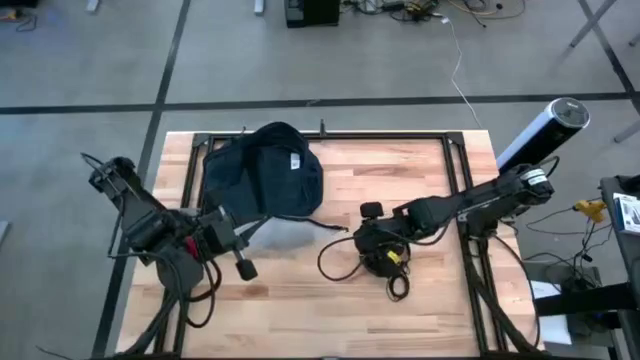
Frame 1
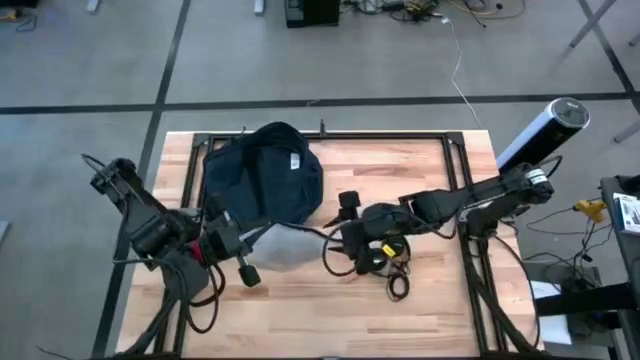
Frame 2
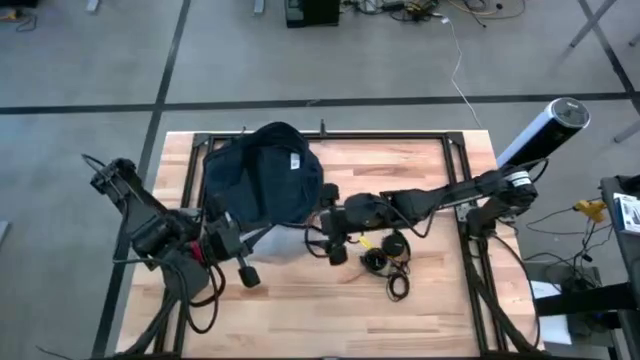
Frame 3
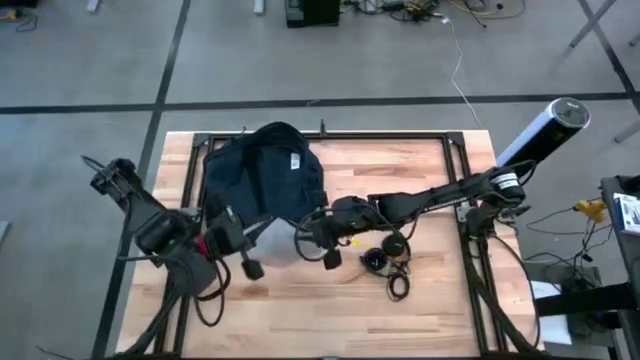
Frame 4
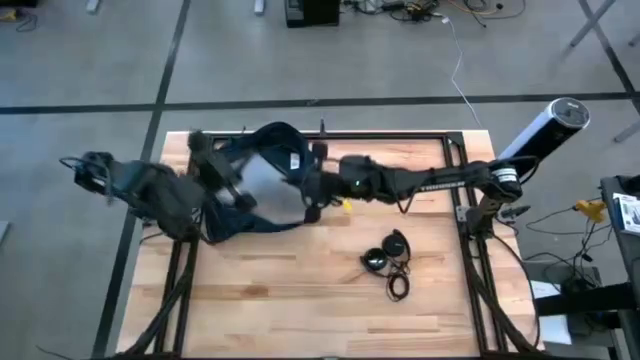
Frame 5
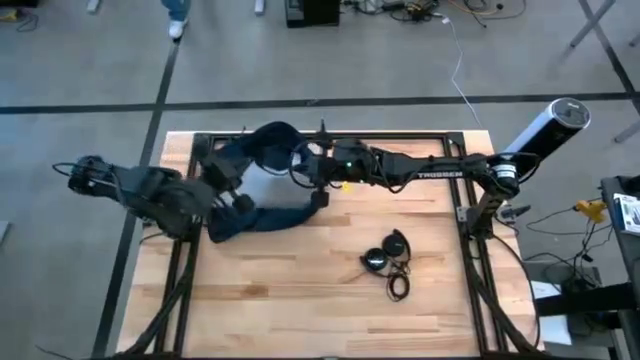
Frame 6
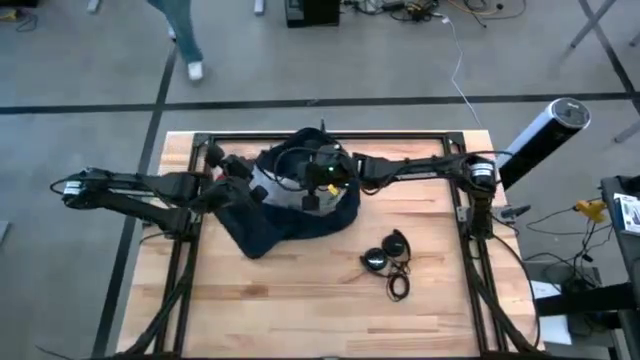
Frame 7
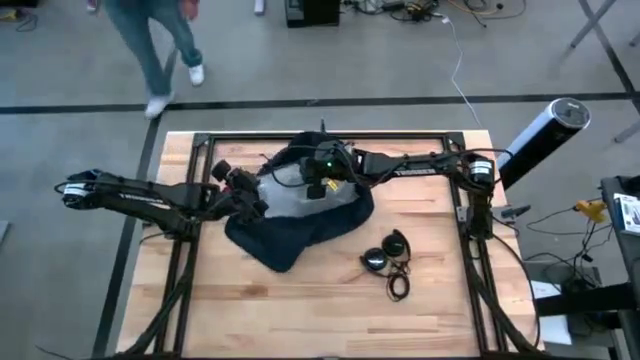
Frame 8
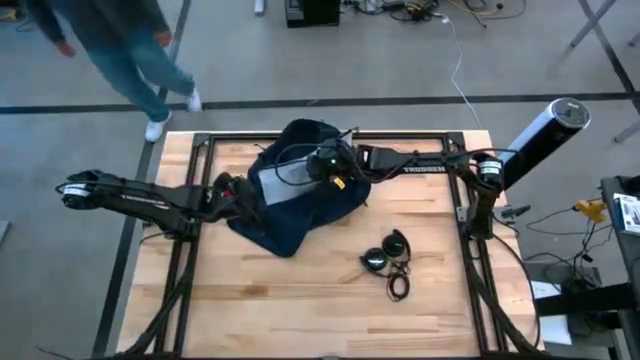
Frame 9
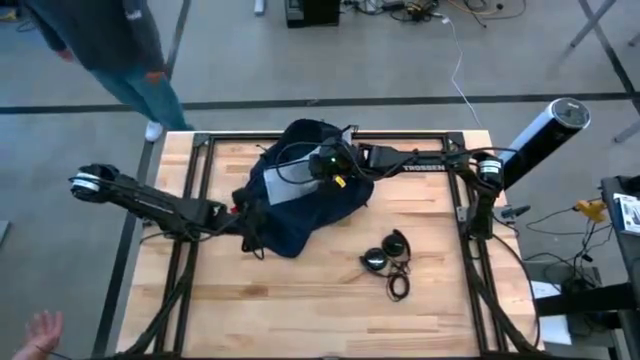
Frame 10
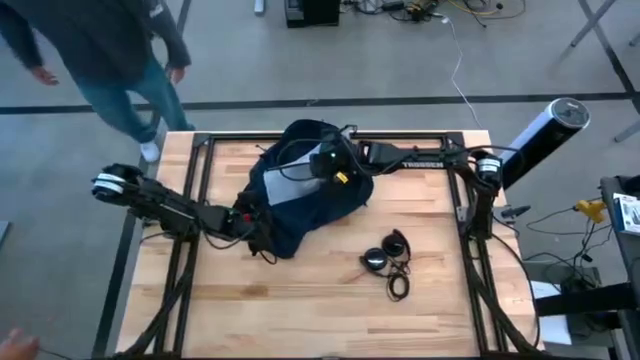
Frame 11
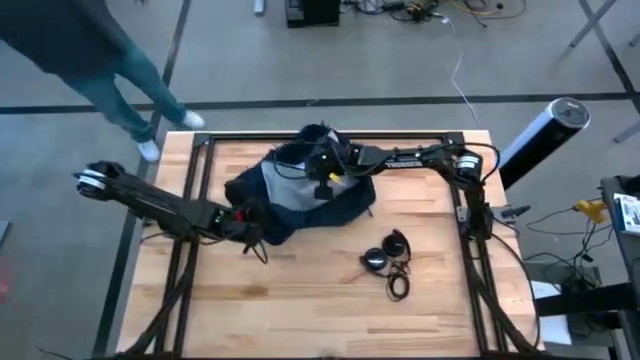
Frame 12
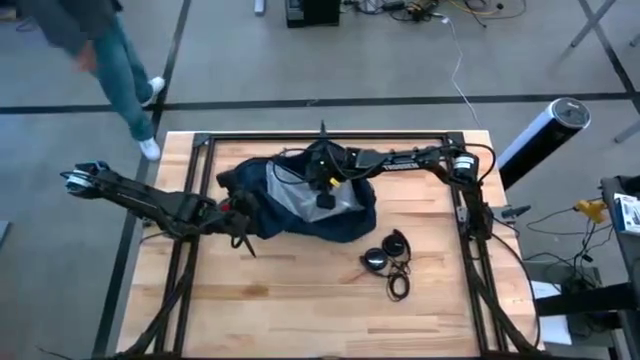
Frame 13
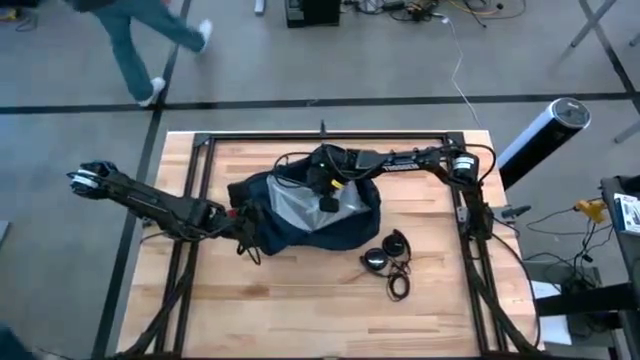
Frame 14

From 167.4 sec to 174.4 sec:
Task: Unpack backpack
Put the white zipper pouch into the blue backpack

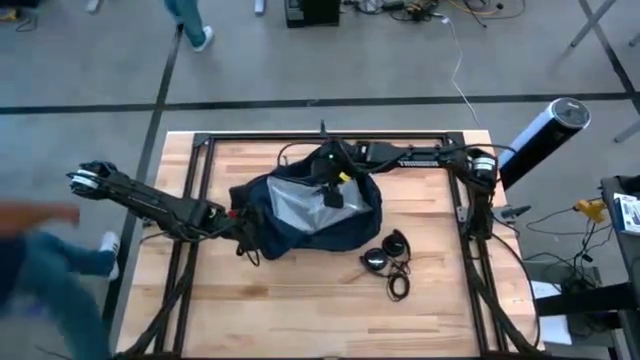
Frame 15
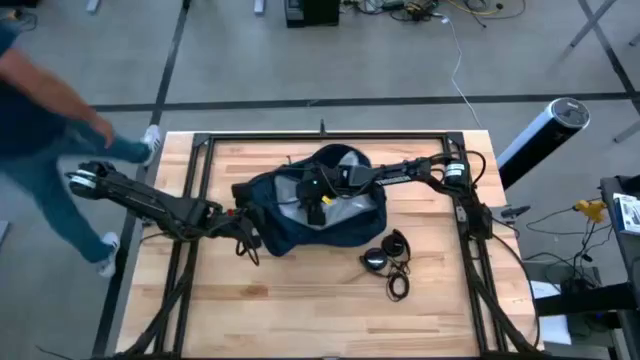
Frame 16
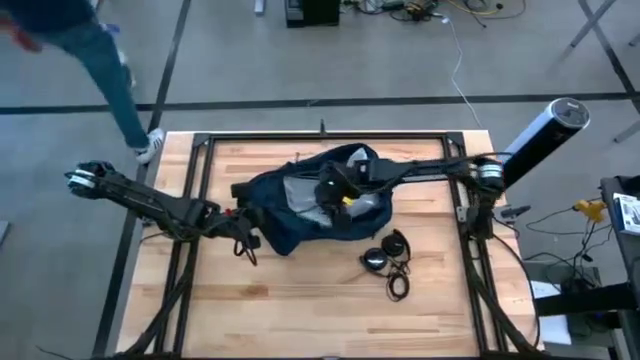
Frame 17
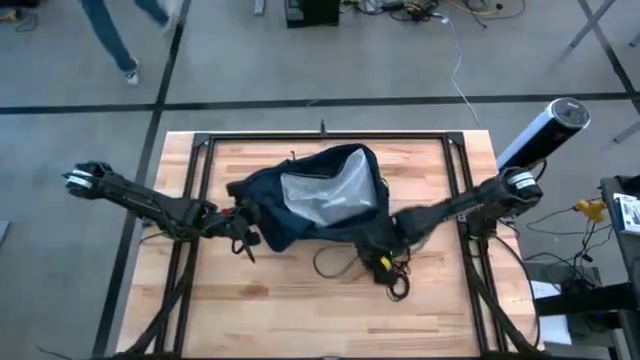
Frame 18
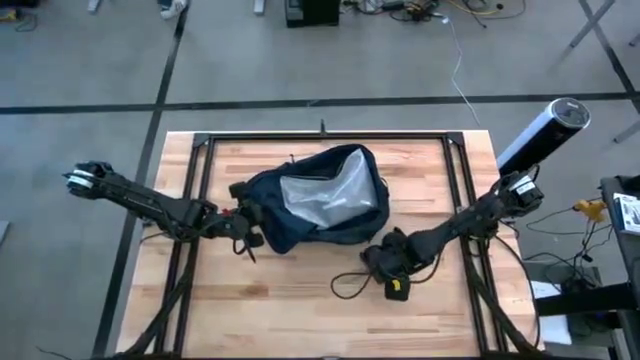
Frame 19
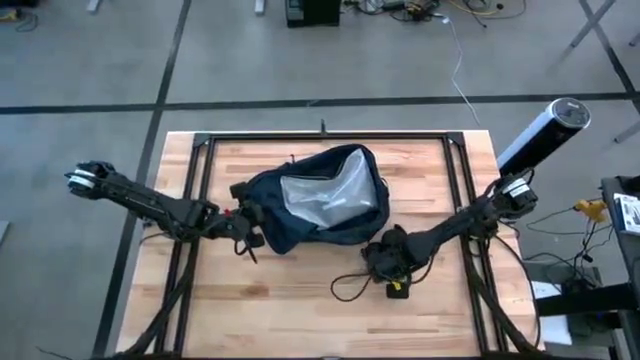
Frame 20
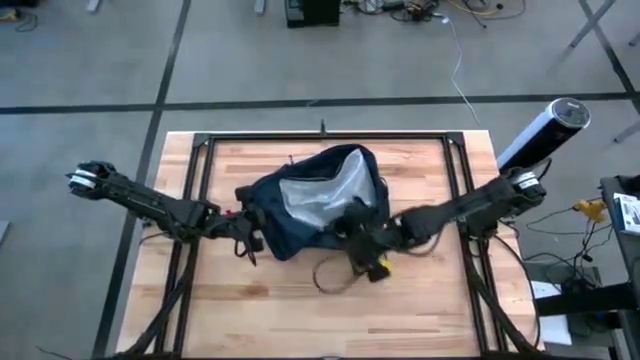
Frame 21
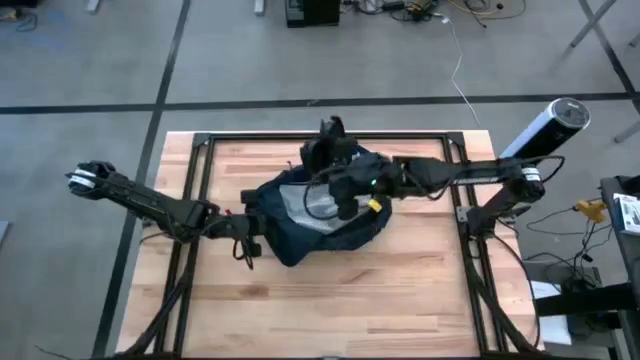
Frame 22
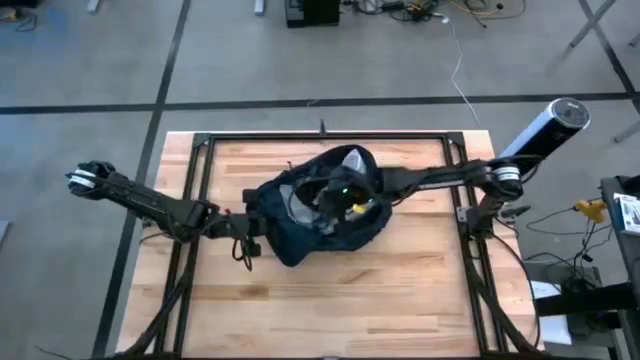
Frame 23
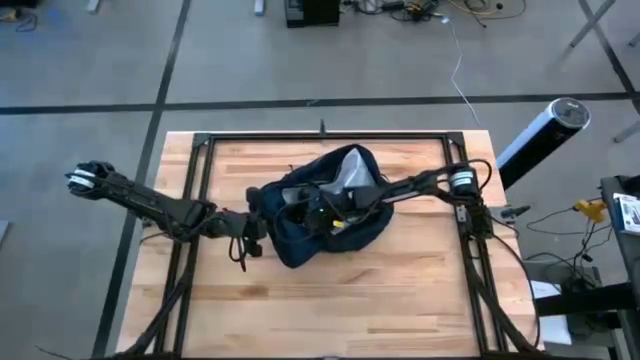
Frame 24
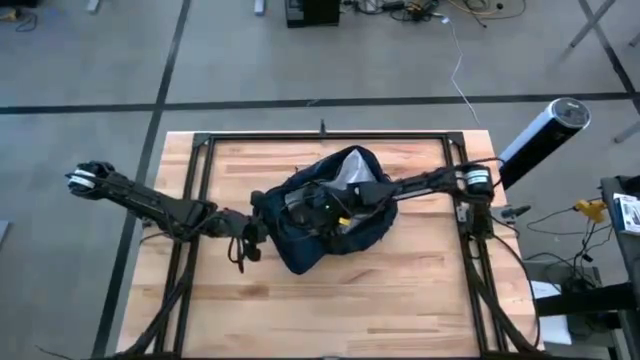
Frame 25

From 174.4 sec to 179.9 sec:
Put the black headphone into the blue backpack

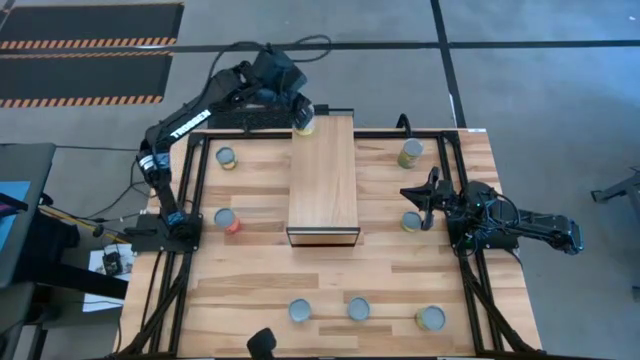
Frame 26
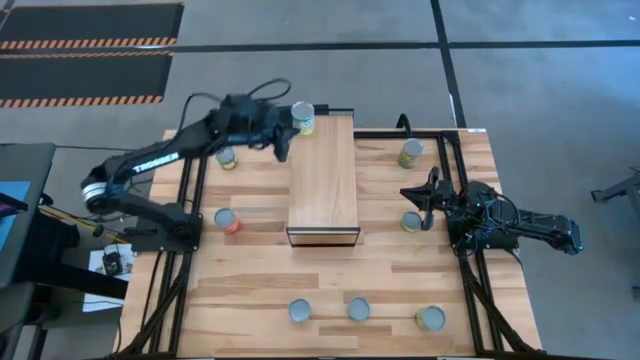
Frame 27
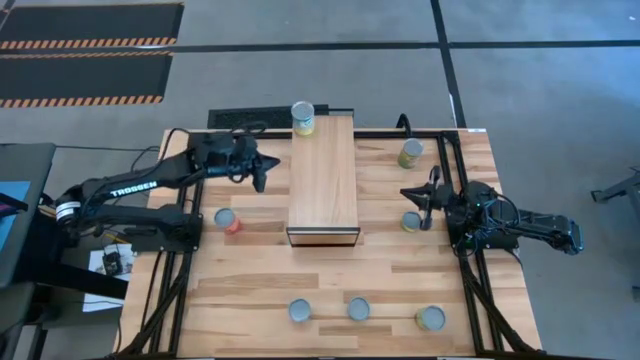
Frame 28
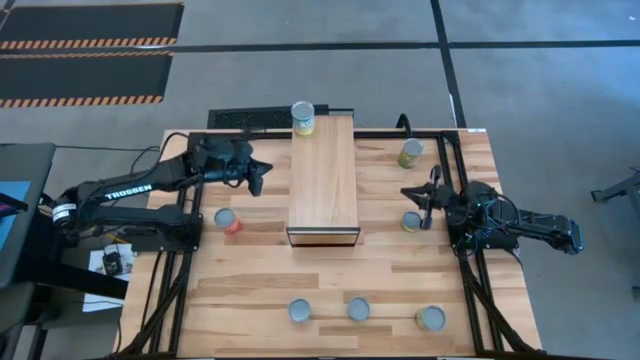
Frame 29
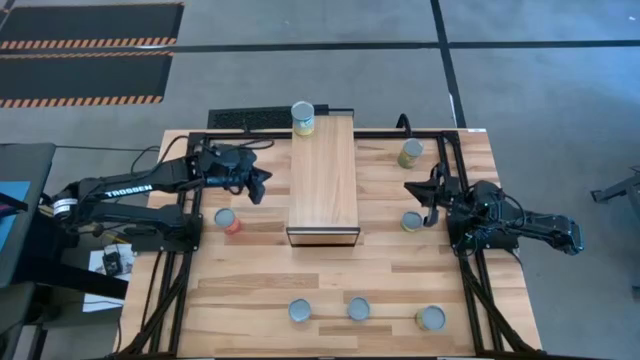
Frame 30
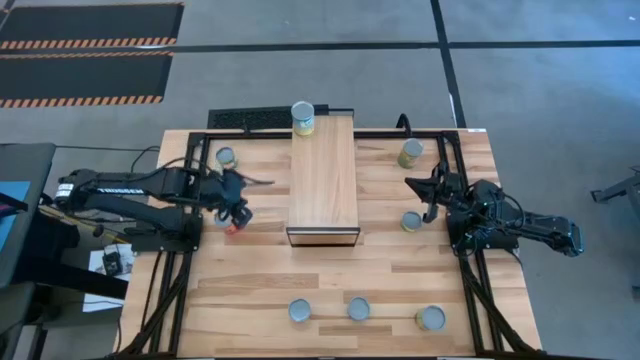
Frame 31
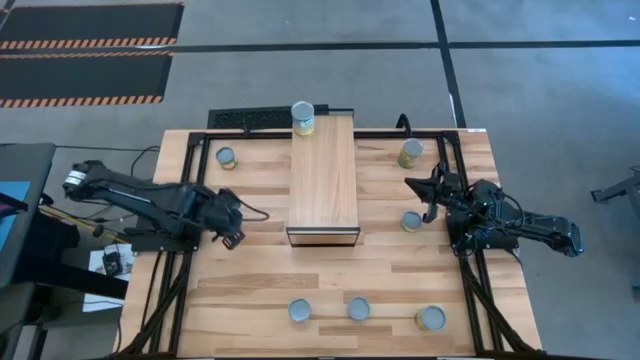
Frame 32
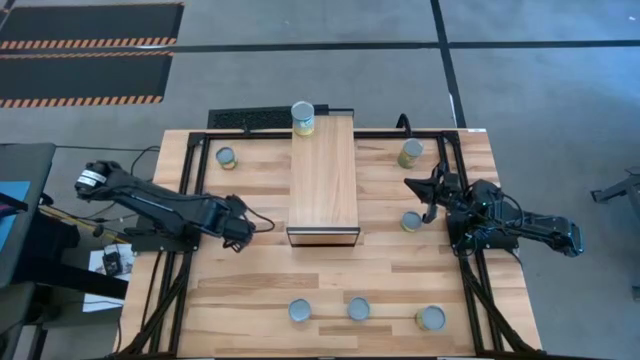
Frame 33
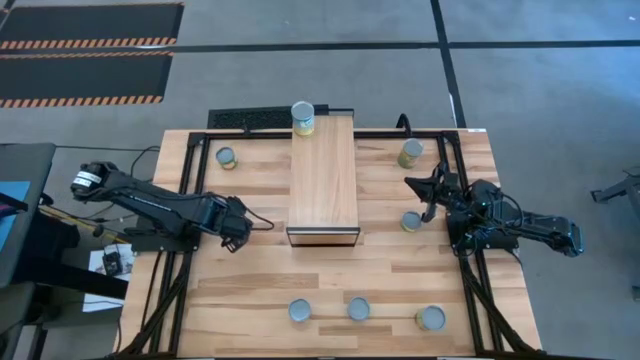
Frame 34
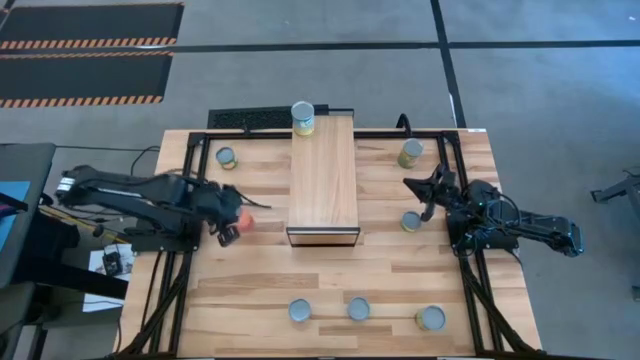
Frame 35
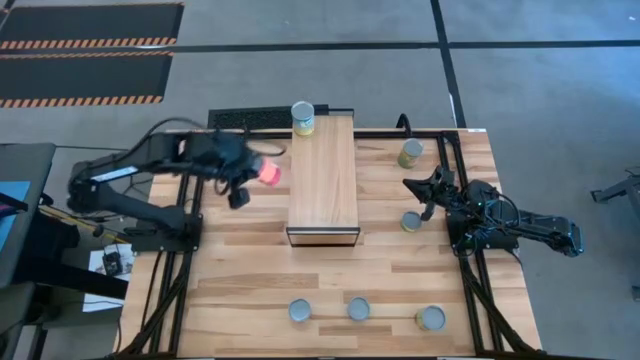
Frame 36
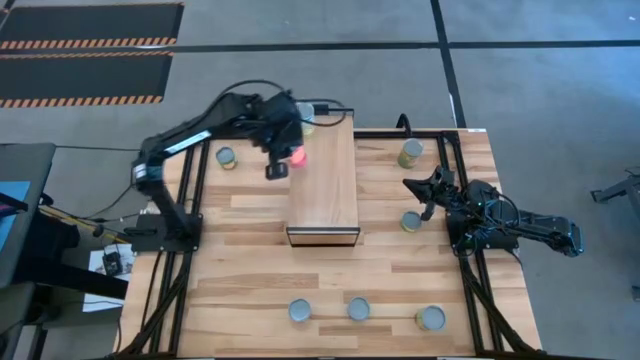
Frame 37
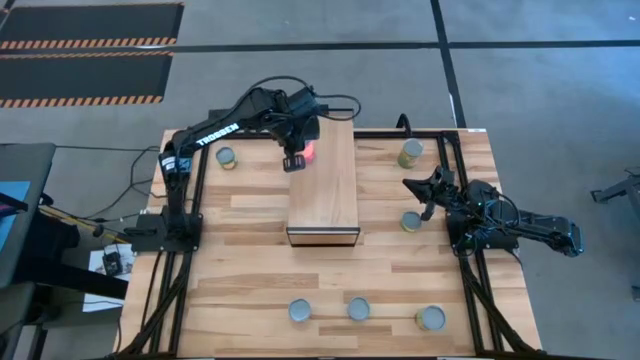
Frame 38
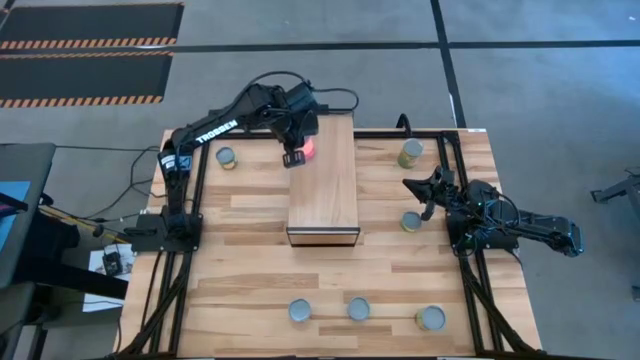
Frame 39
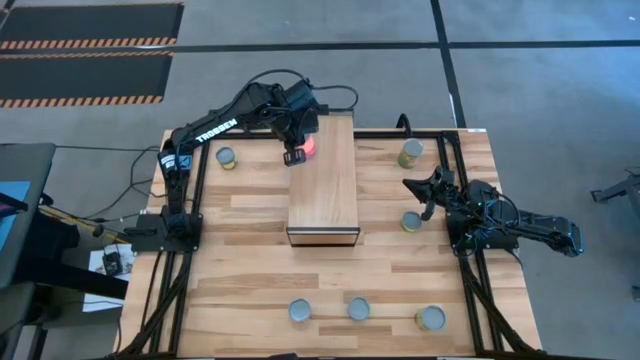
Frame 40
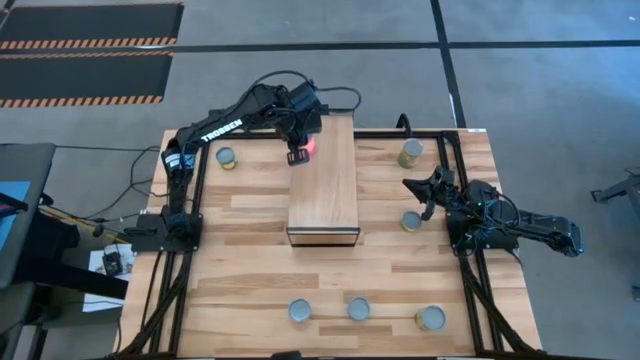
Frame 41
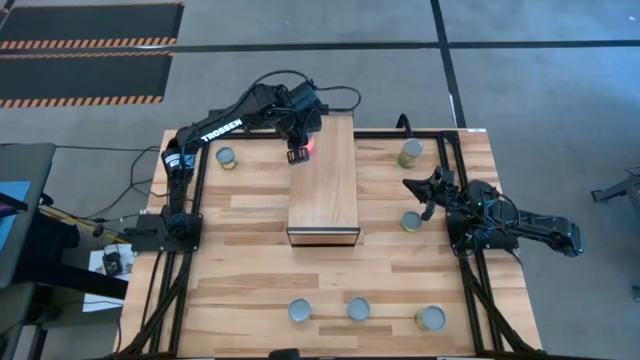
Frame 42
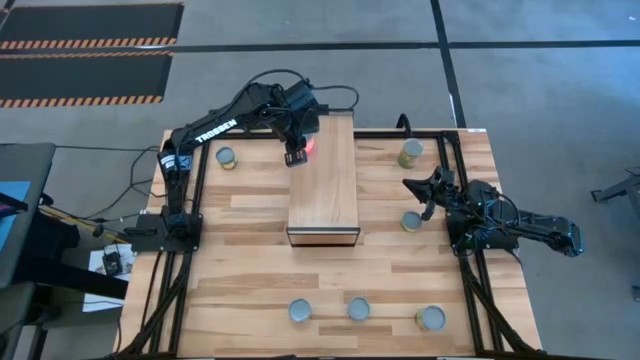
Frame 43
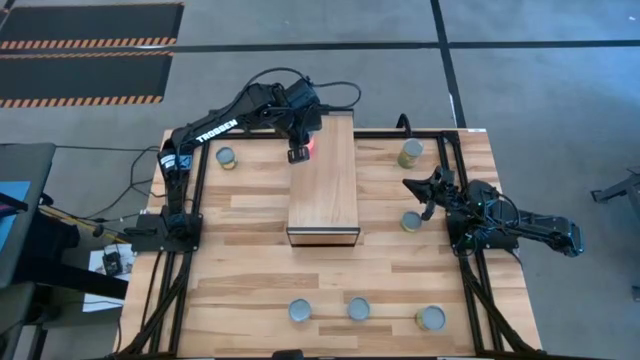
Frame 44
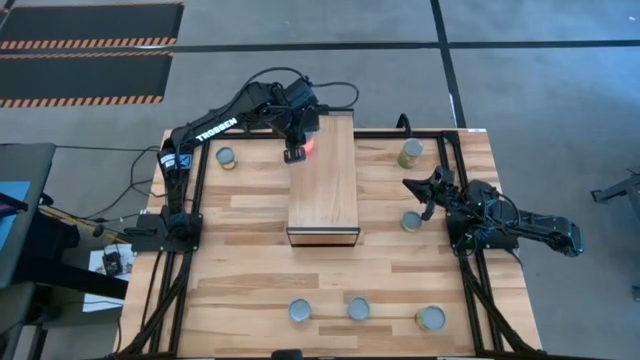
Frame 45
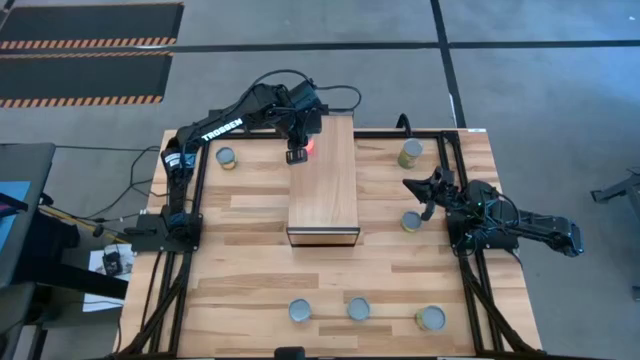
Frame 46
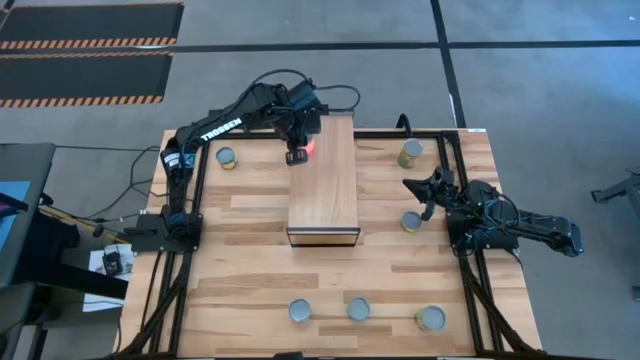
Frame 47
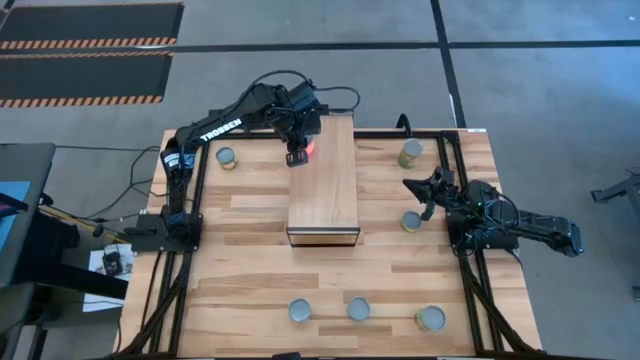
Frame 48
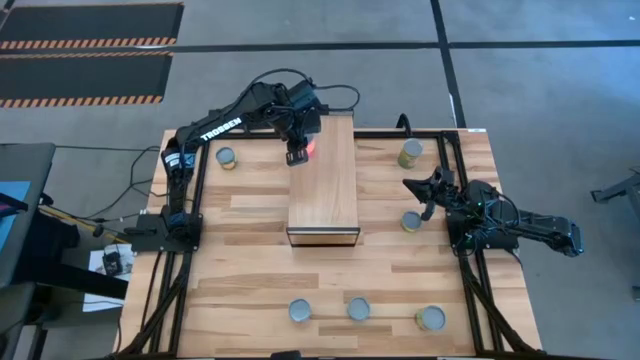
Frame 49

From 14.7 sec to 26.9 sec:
Task: Pick and place cans onto a shelf
Put the canned mixed fruits on the shelf
